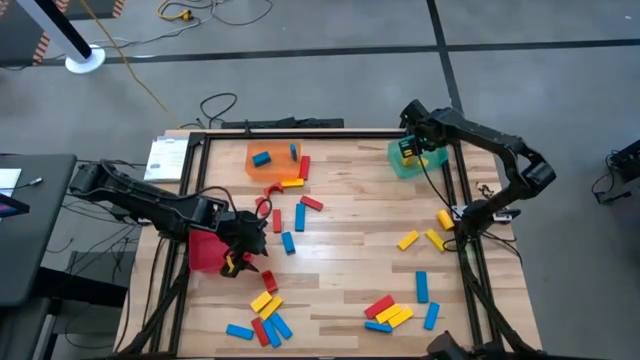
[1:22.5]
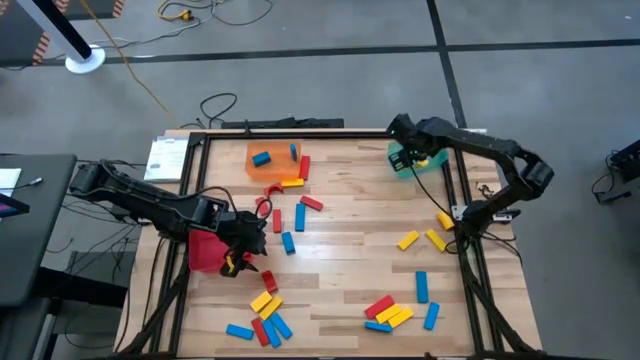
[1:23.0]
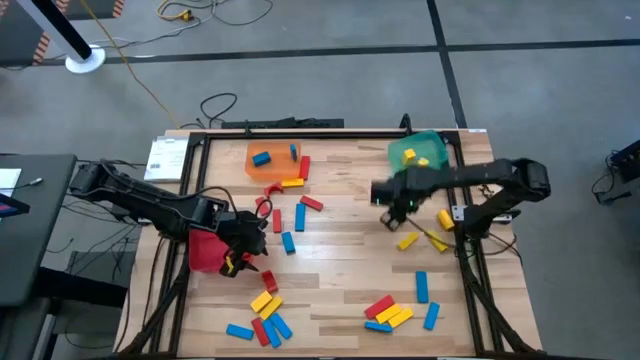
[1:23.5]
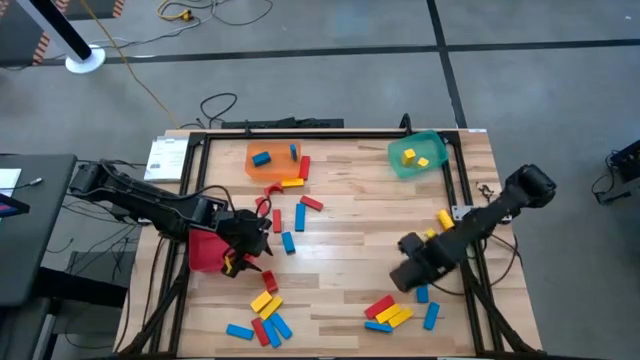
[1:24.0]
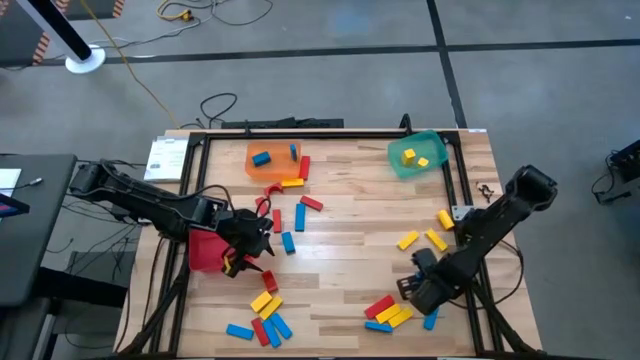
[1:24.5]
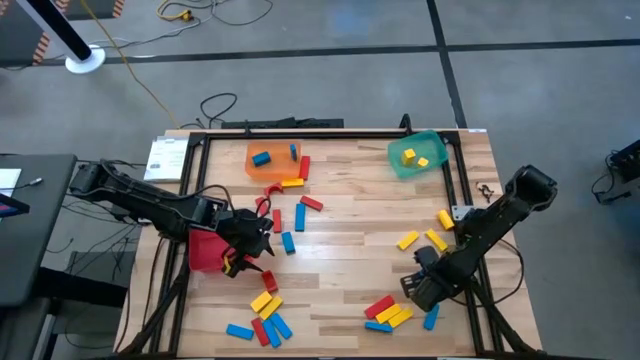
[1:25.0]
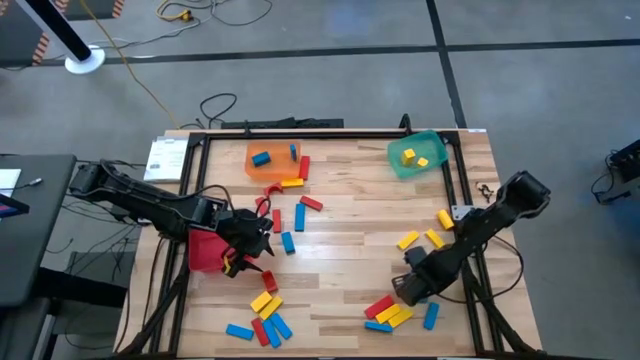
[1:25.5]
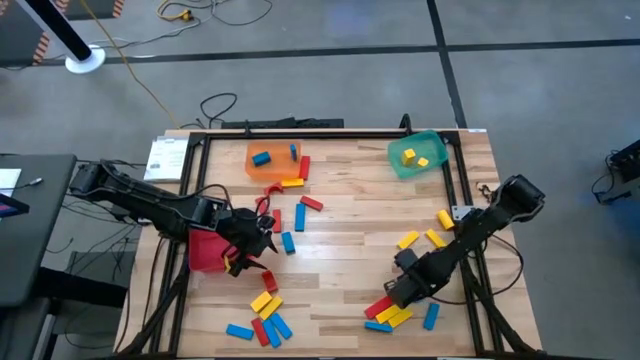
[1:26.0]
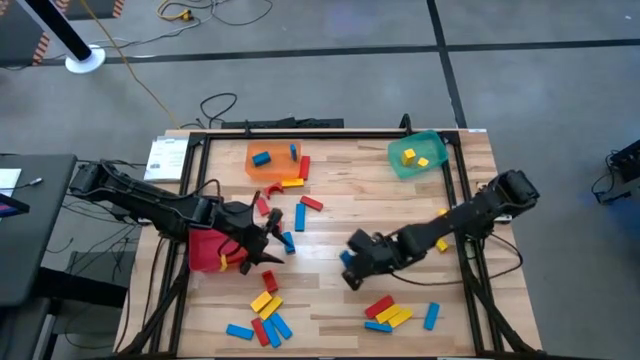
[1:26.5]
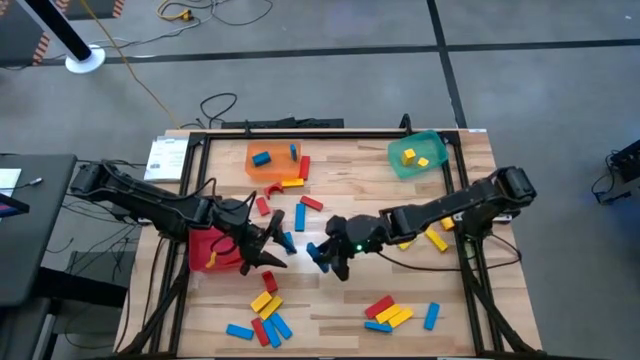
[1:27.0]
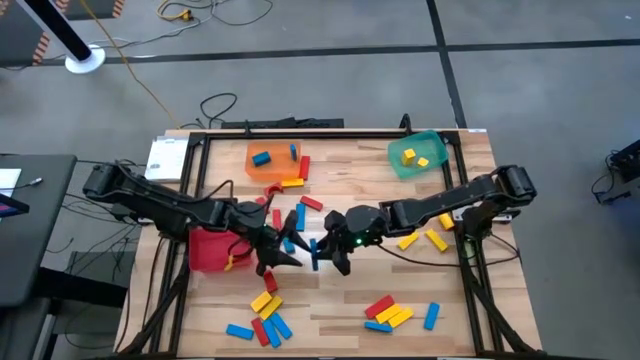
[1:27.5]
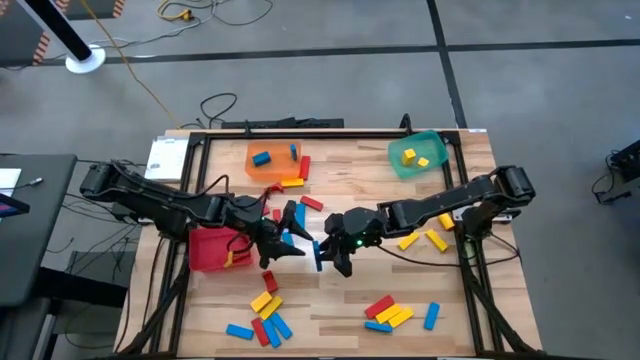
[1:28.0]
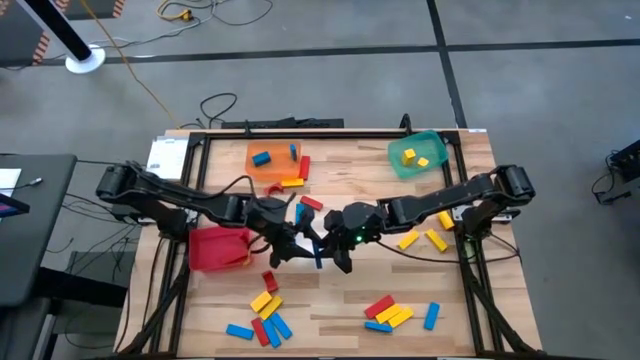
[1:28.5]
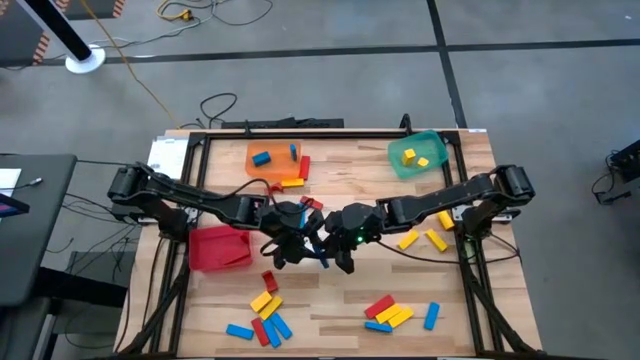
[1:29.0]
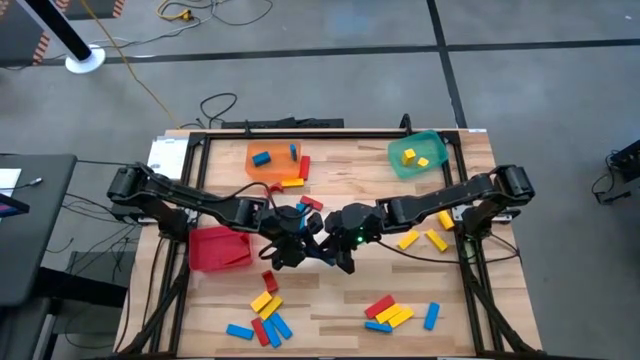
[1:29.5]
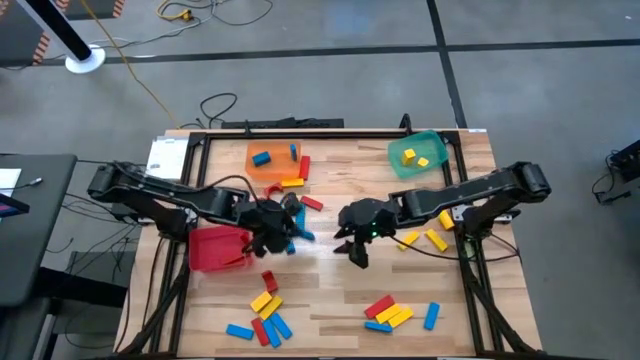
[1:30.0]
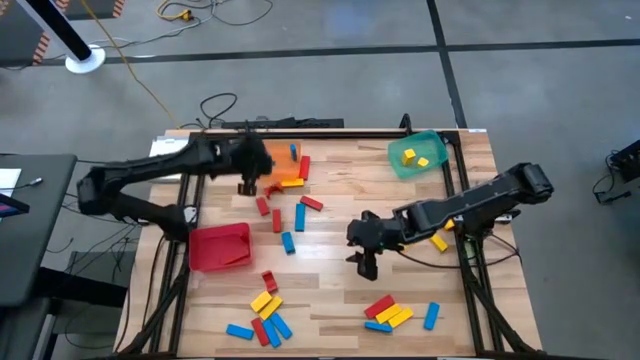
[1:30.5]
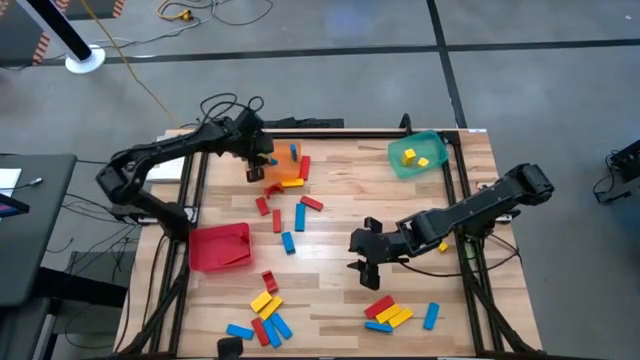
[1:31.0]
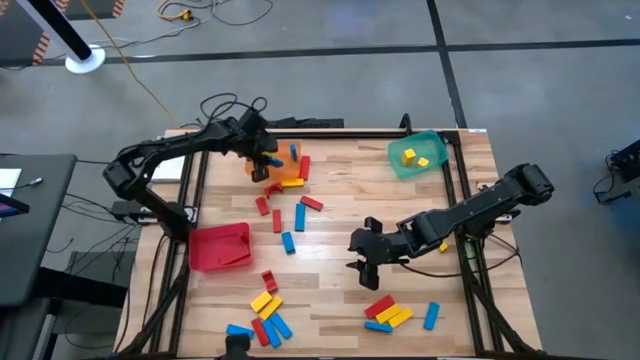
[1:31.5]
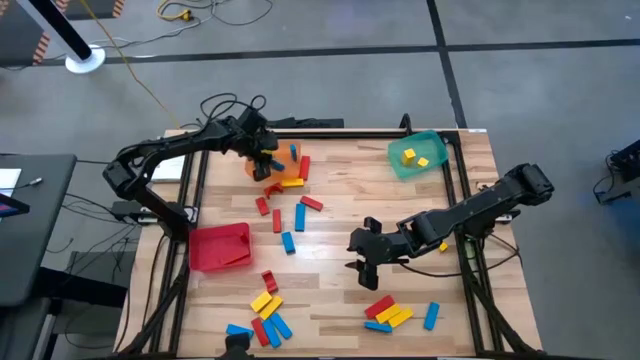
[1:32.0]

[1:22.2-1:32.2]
Task: Sort blocks
Put the blue block into the orange bin

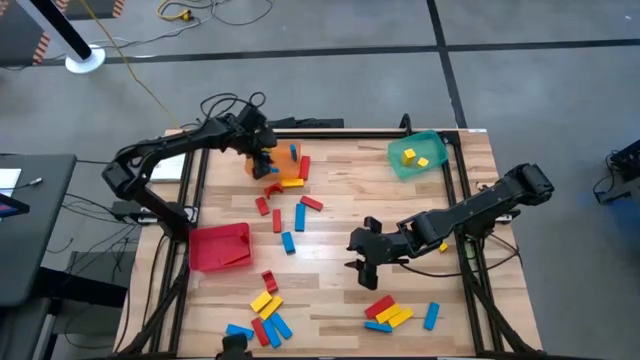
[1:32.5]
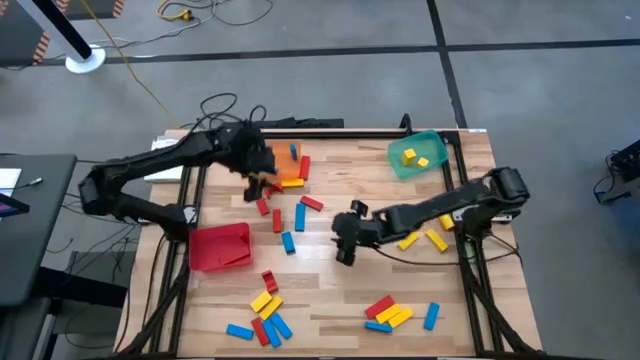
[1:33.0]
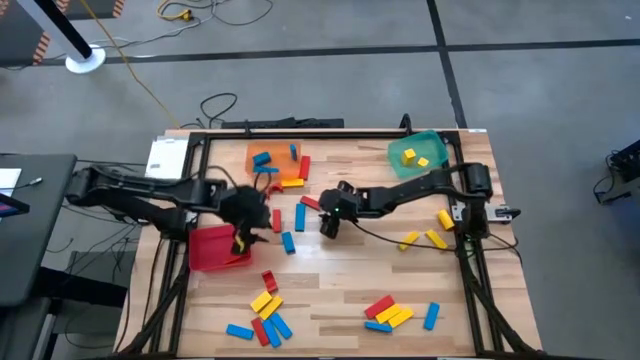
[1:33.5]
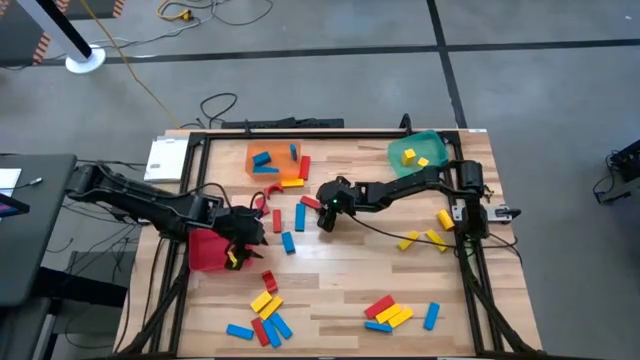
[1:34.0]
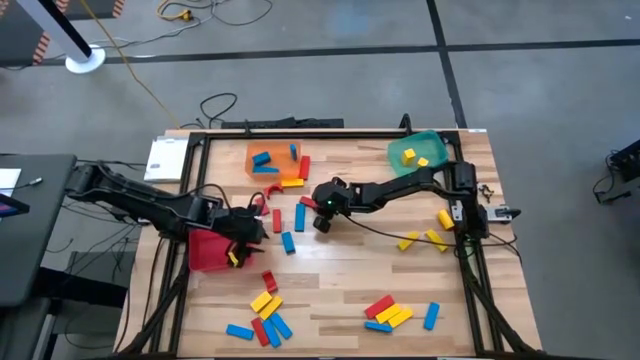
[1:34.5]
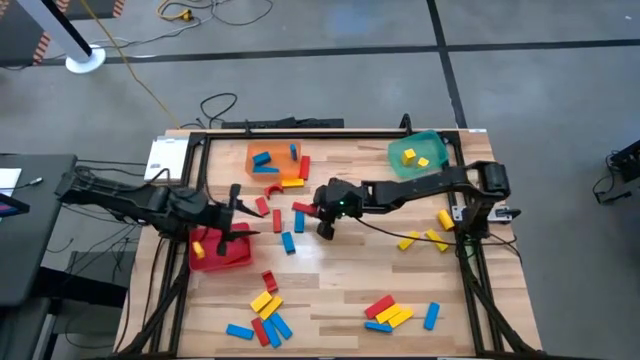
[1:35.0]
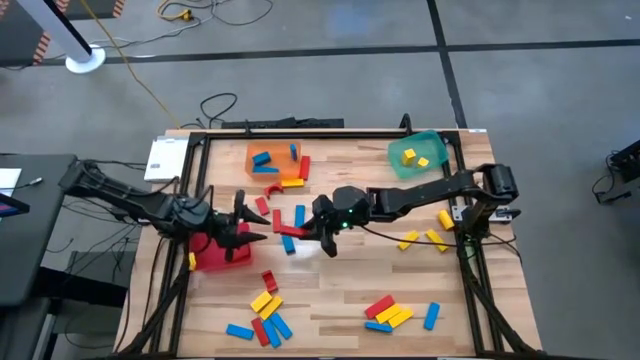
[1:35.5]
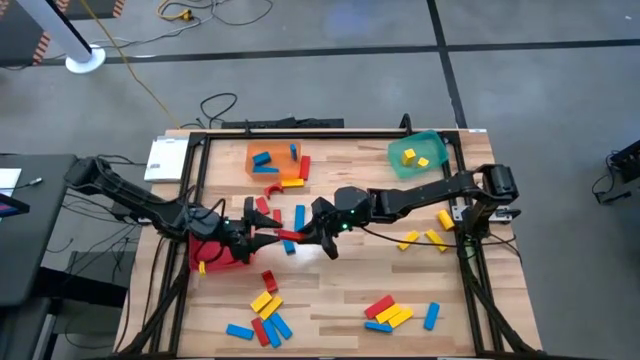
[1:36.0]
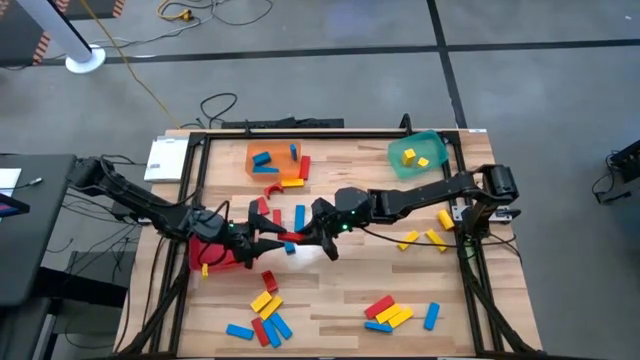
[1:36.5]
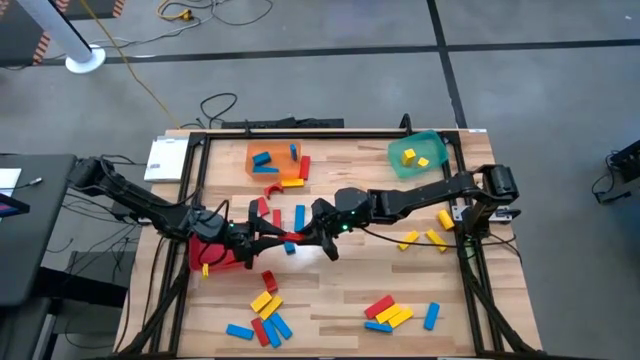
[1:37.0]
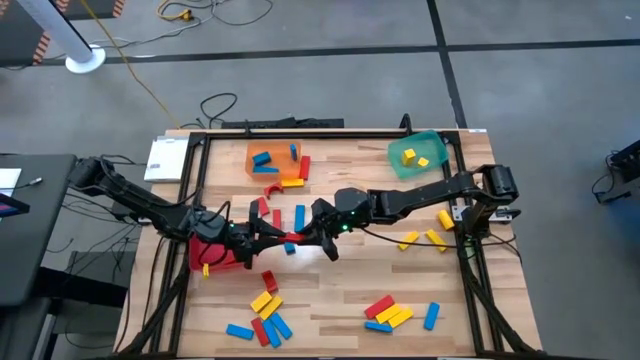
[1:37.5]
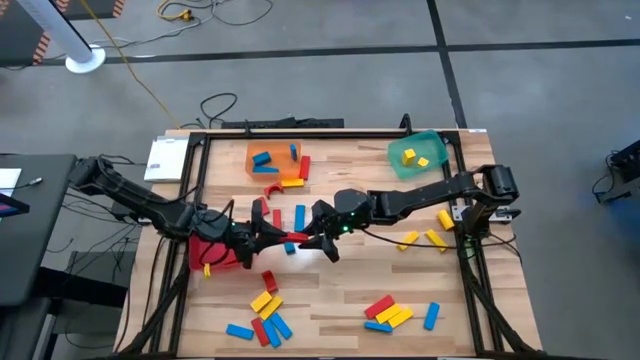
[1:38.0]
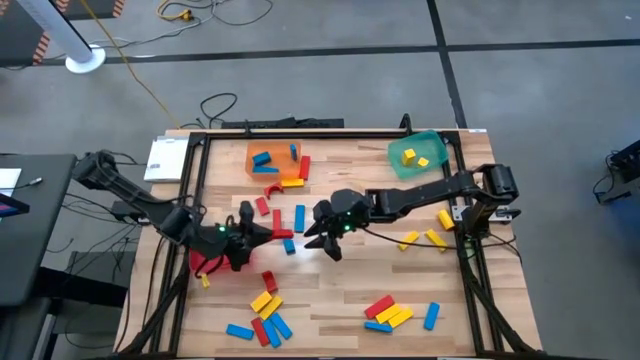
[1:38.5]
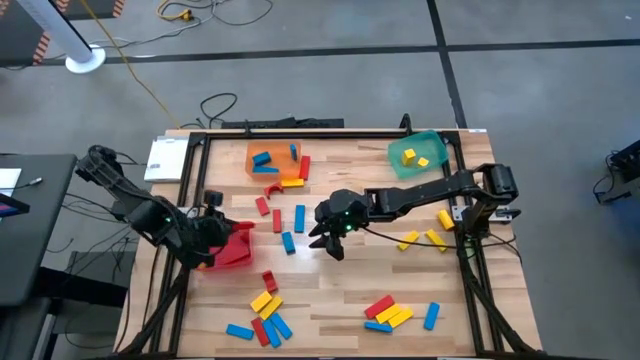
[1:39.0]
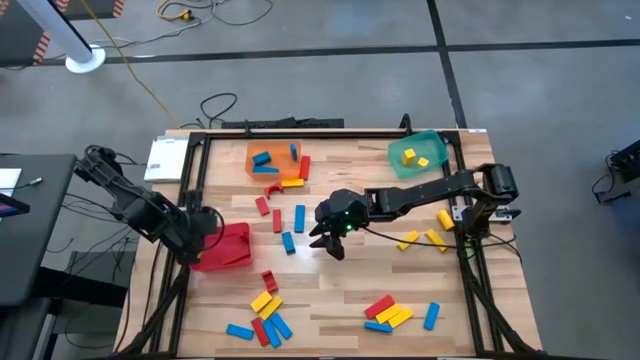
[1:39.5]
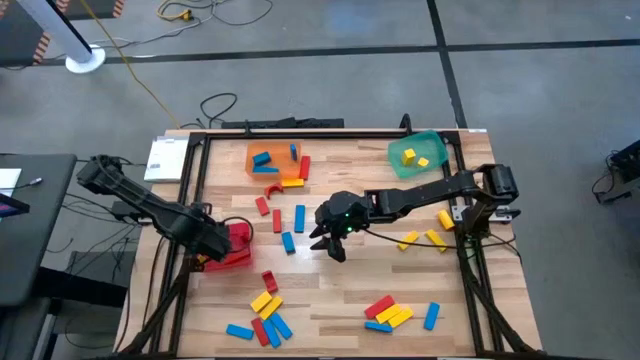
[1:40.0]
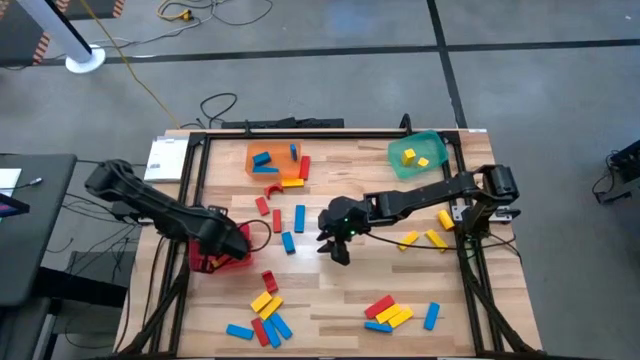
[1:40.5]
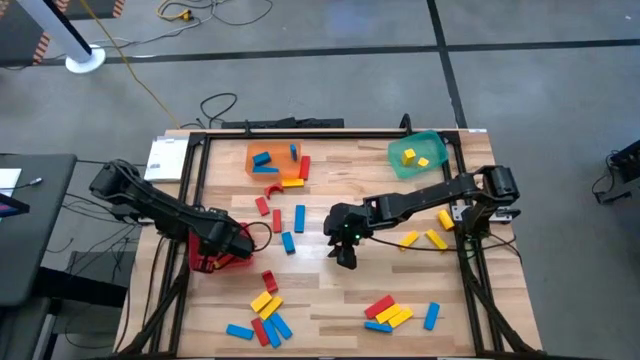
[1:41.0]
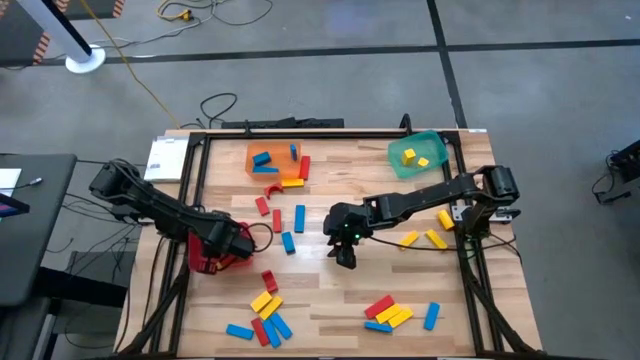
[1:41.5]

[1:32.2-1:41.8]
Put the red block into the red bin

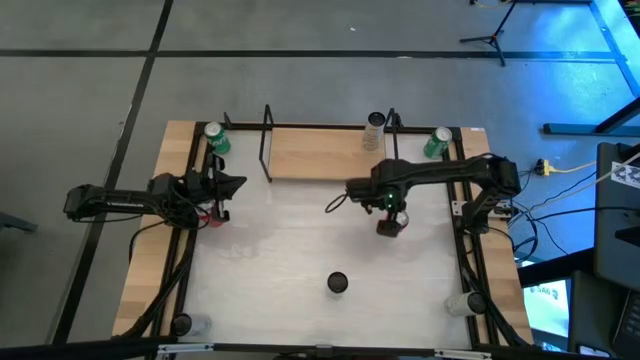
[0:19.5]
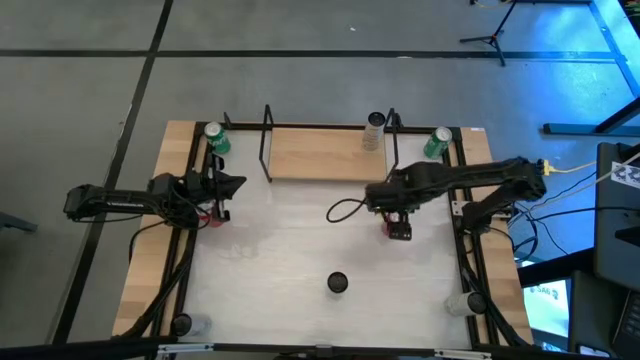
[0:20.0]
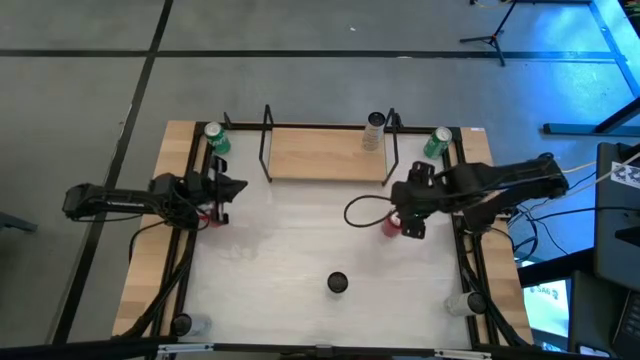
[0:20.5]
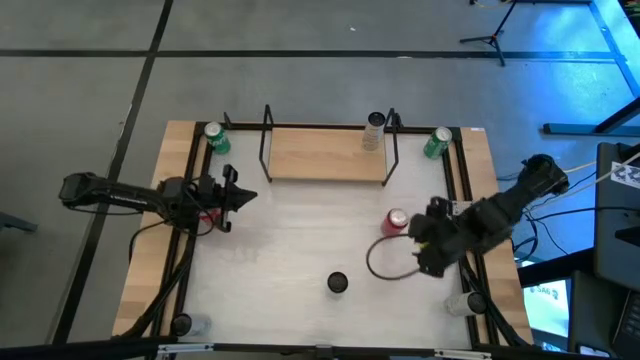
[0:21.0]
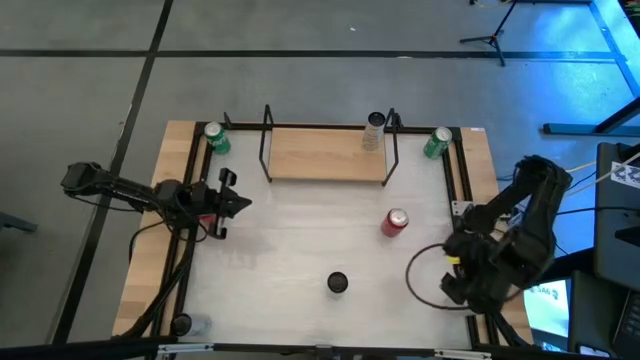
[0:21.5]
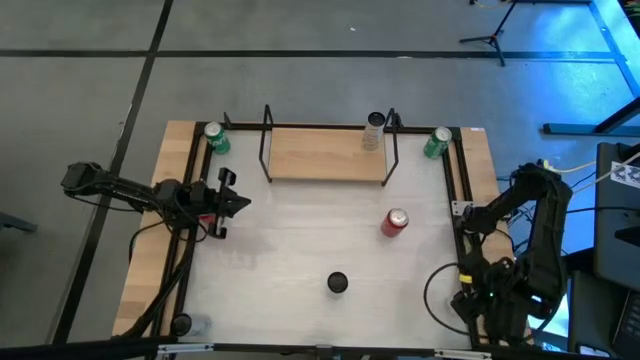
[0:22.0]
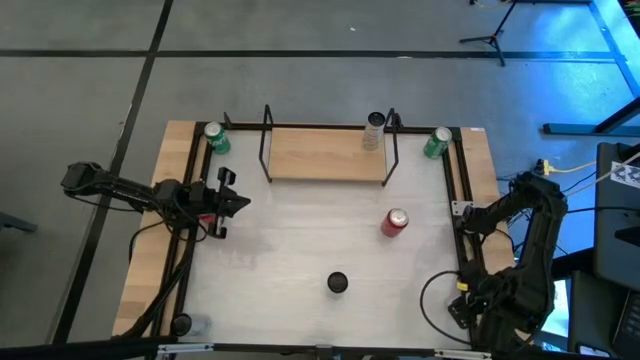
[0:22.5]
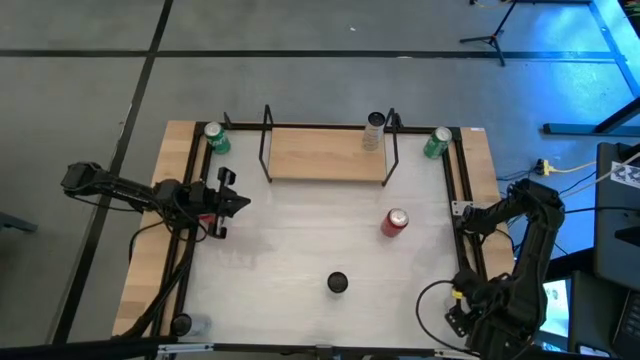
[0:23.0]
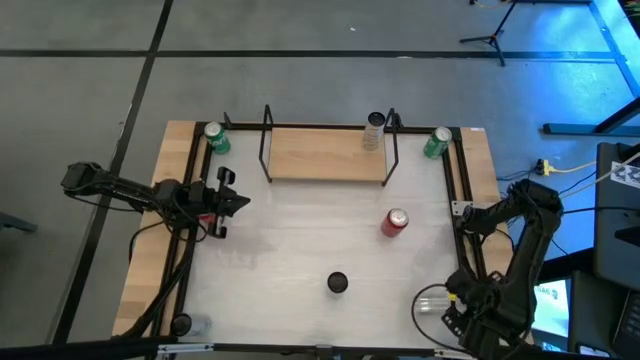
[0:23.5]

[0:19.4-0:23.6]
Task: Place canned beverage on shelf
Put the white and yellow soda can on the shelf
